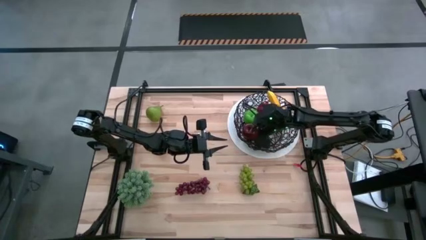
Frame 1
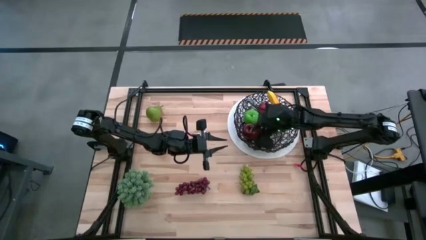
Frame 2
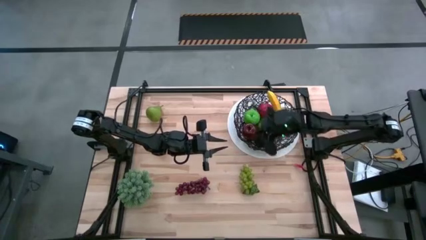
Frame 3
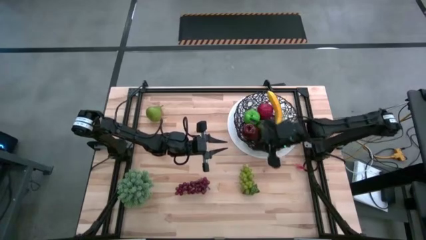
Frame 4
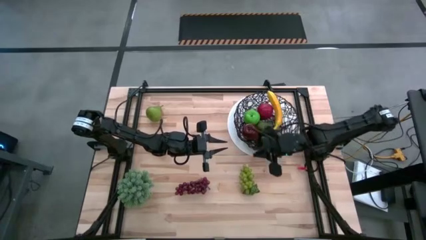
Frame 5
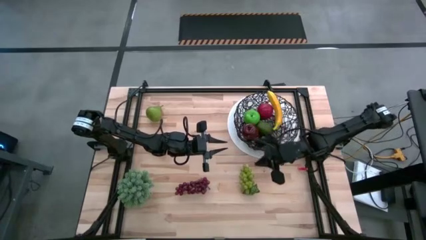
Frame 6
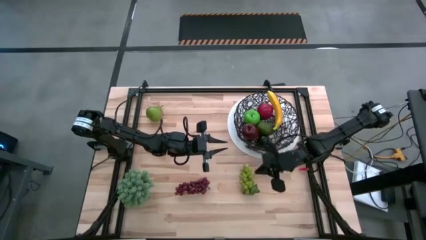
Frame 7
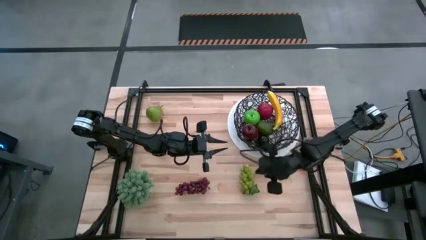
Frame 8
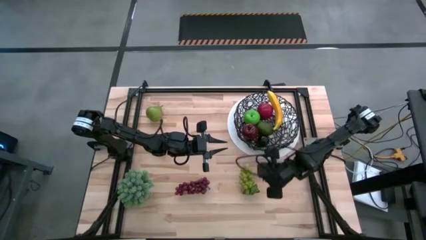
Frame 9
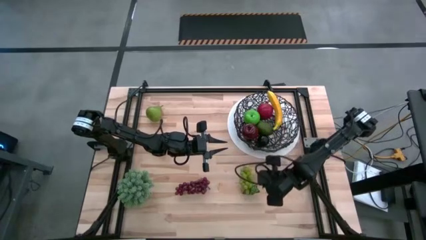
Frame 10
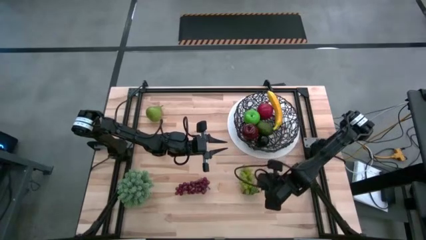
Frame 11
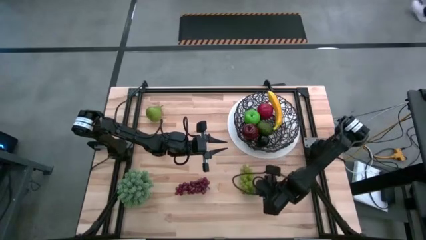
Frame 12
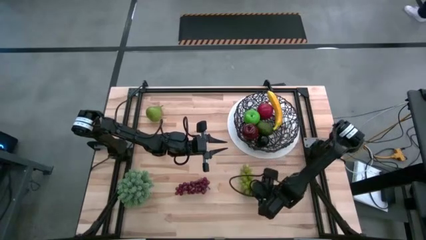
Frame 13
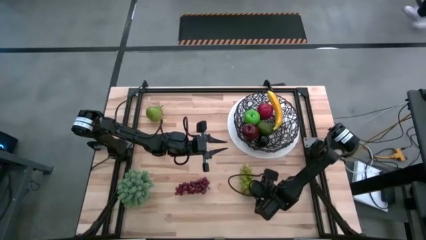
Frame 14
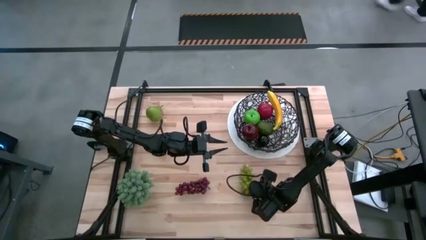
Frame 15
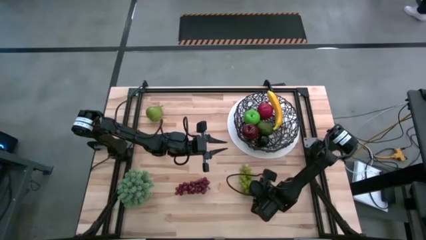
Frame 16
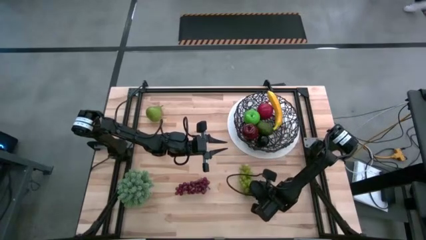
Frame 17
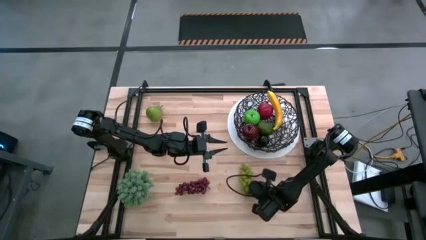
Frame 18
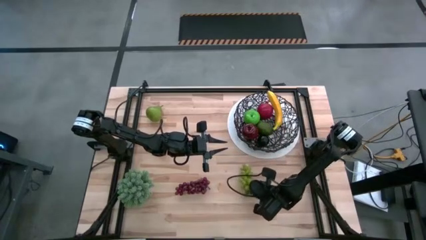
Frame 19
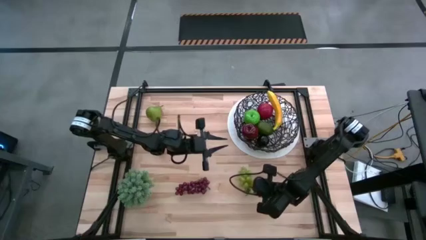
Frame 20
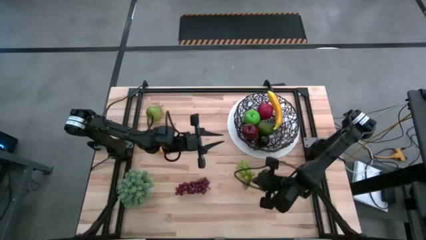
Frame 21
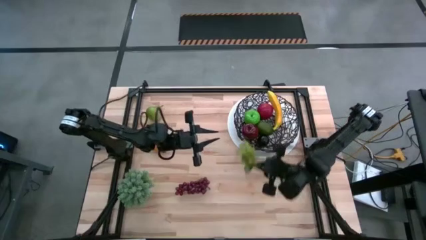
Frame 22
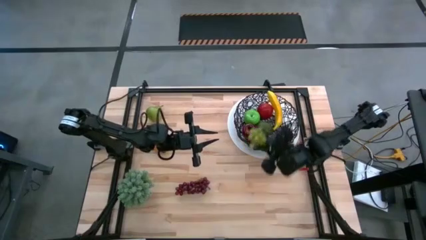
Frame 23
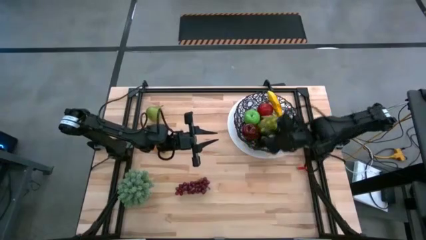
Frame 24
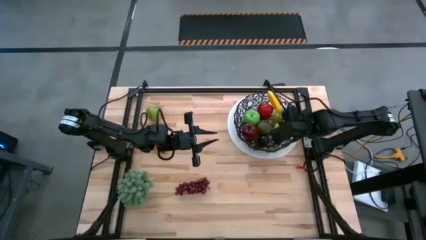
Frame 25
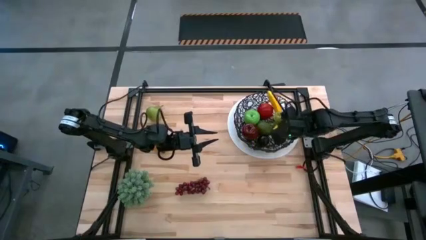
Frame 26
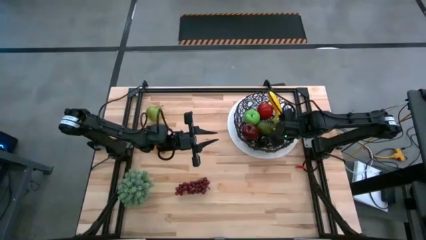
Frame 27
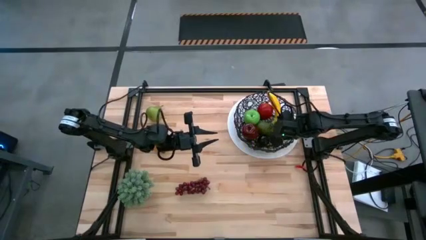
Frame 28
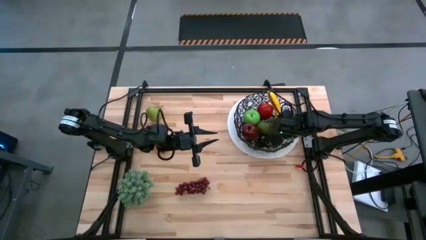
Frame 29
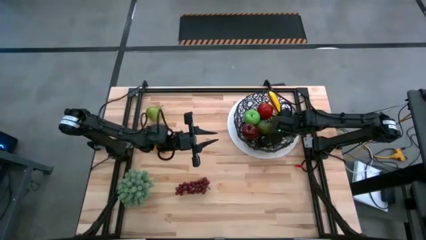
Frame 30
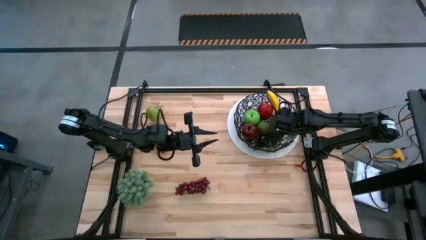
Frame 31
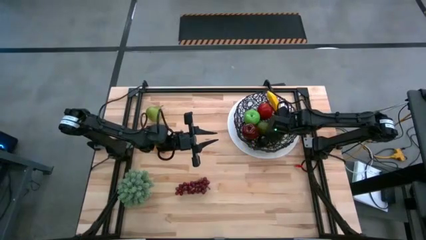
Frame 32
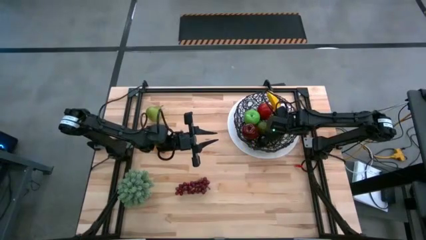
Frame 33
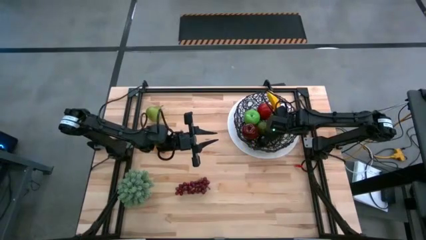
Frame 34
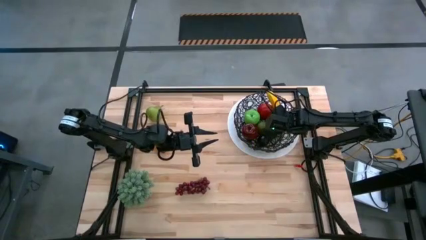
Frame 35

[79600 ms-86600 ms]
Task: Build produce basket
Put the green grapes into the wire basket

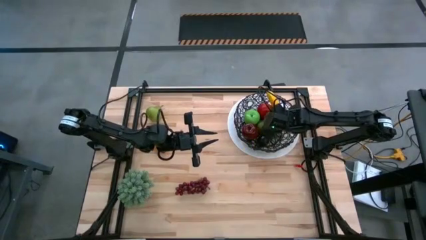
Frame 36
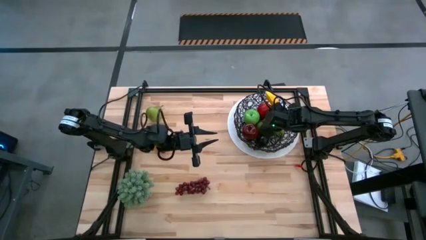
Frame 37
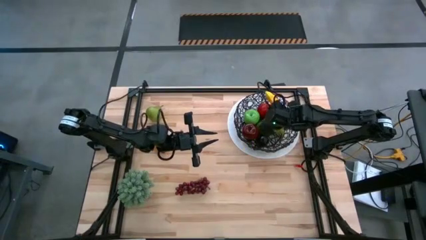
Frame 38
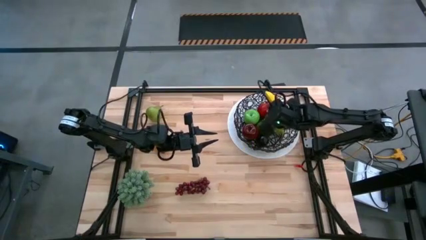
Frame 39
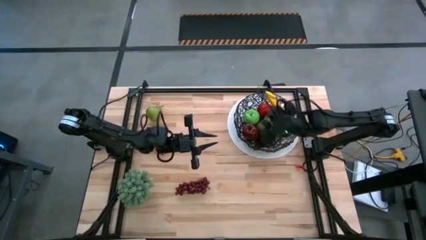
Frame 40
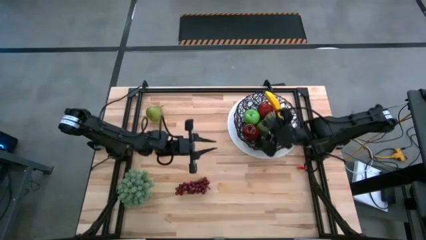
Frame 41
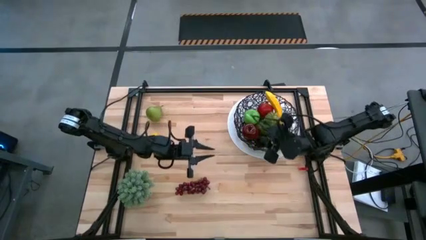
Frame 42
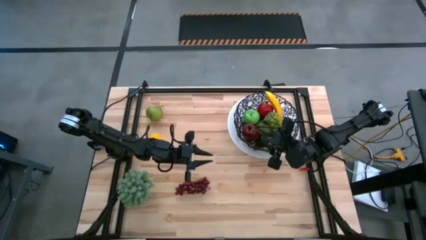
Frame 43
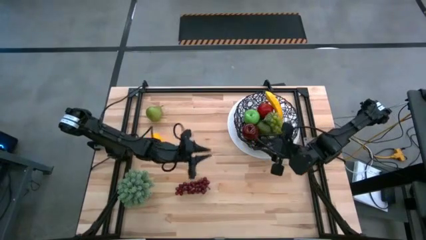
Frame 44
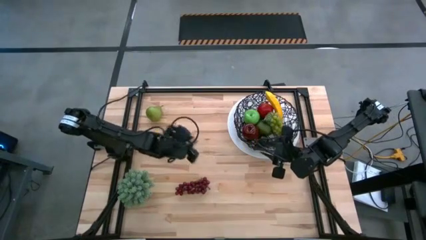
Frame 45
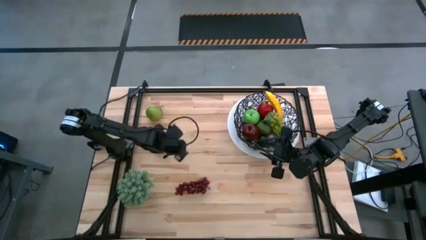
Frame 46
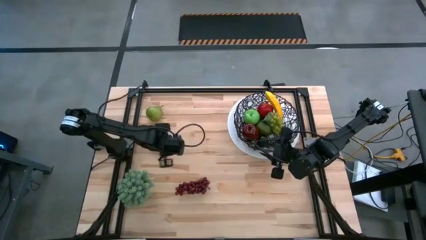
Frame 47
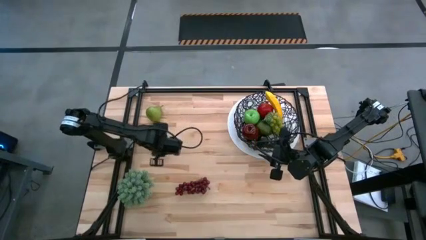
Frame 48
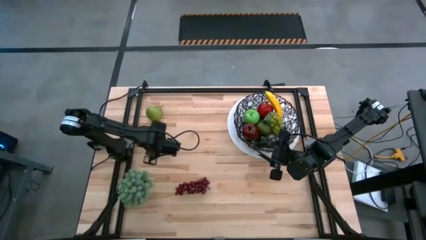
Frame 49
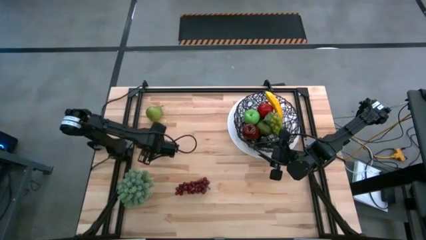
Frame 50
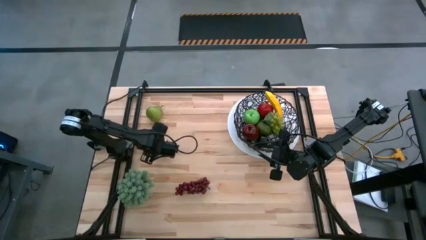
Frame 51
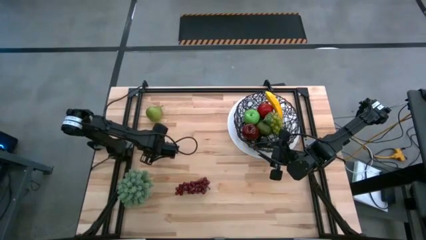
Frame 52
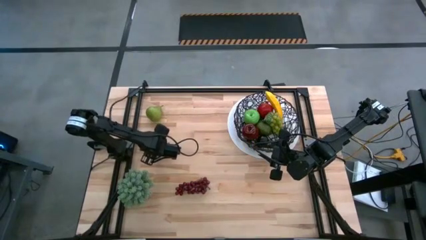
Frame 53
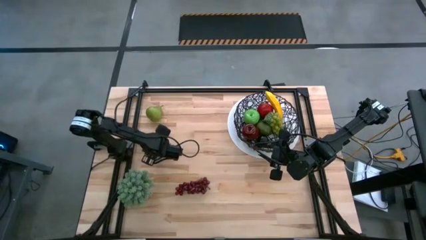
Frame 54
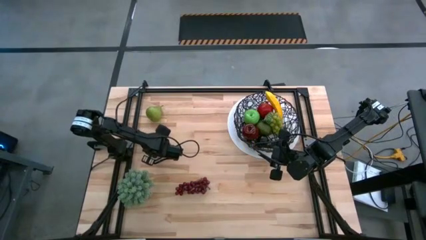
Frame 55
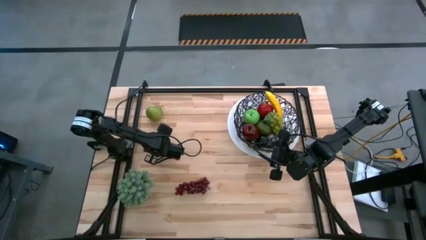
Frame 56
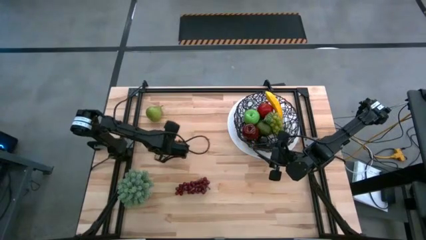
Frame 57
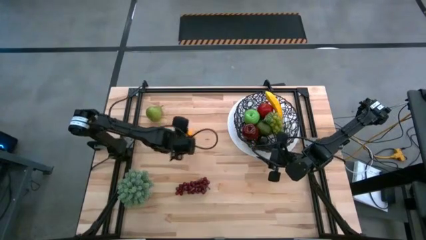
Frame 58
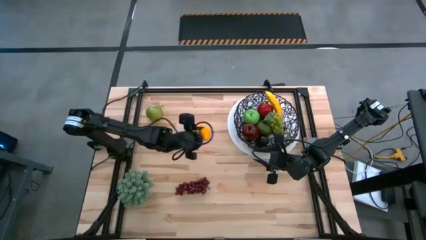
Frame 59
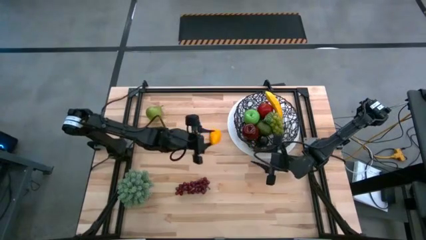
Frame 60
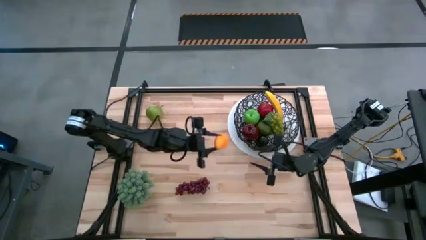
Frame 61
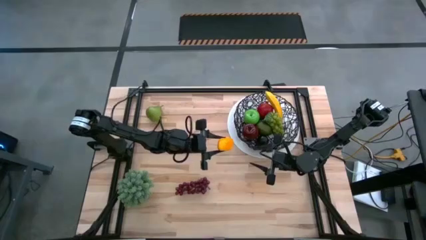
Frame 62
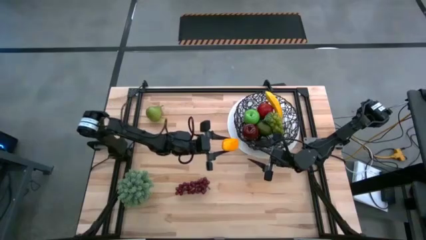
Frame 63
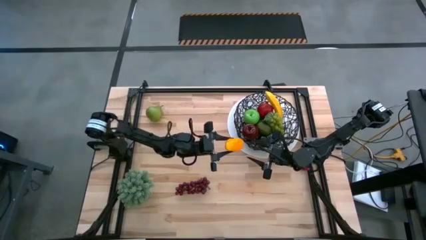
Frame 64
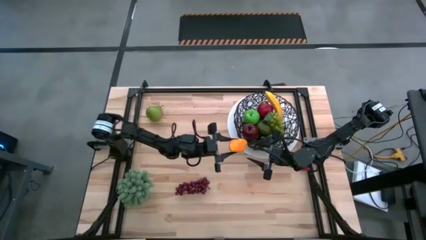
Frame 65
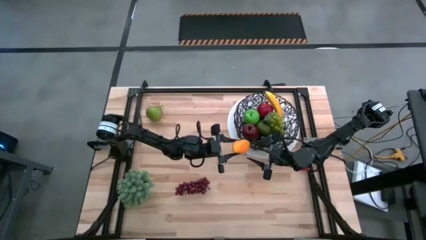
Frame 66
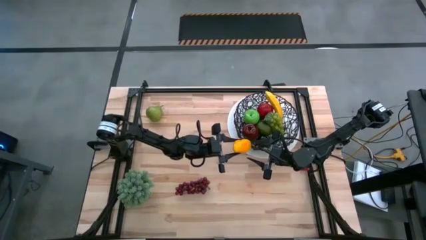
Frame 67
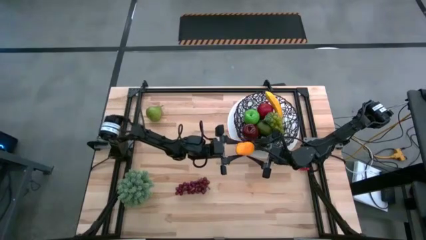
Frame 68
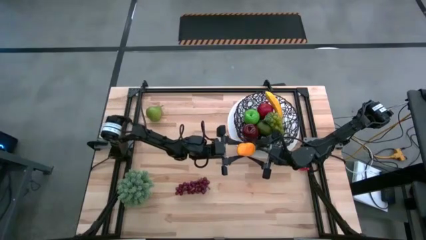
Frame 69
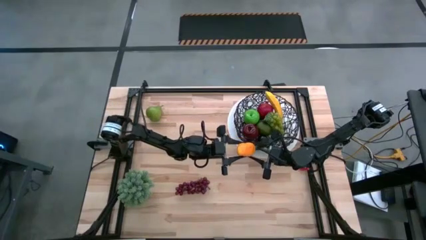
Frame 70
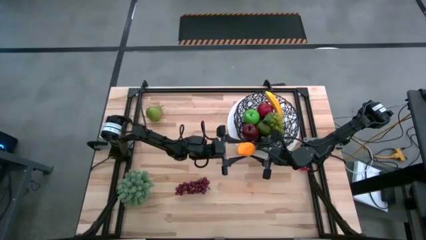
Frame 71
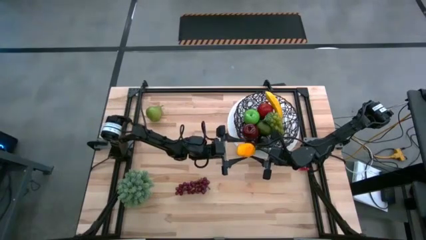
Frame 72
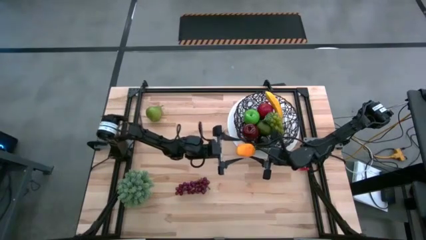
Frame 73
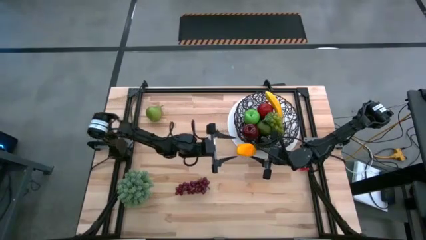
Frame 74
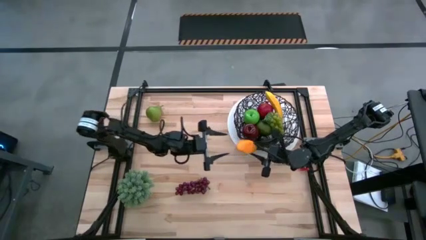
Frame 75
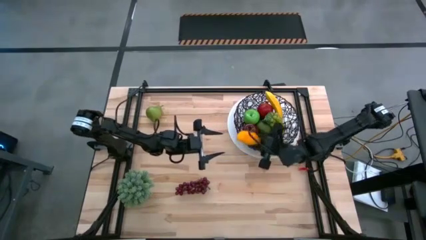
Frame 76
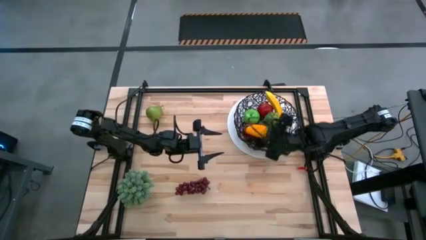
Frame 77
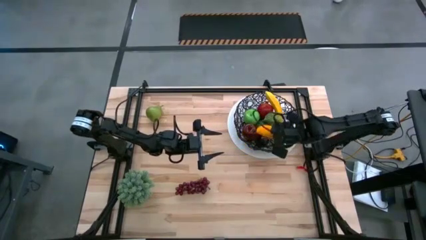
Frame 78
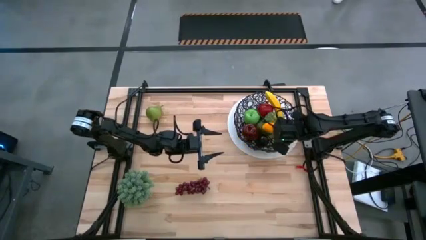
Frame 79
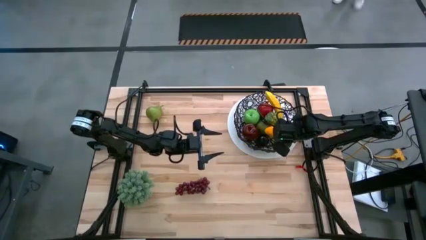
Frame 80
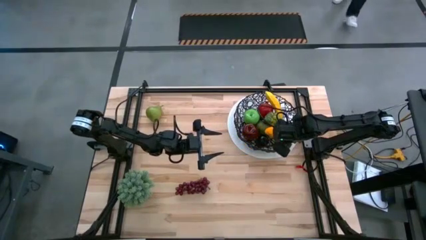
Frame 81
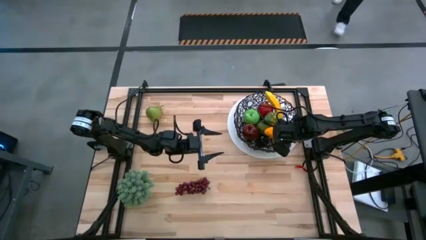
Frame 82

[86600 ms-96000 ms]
Put the yellow mango into the wire basket

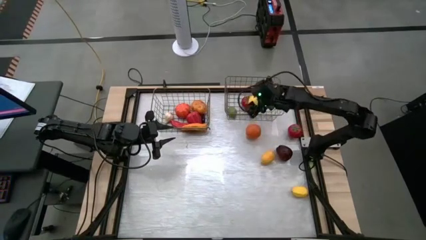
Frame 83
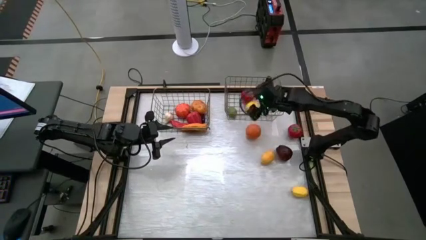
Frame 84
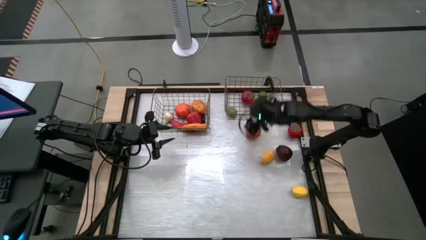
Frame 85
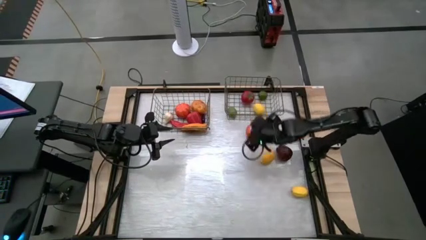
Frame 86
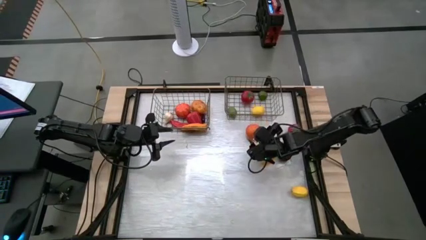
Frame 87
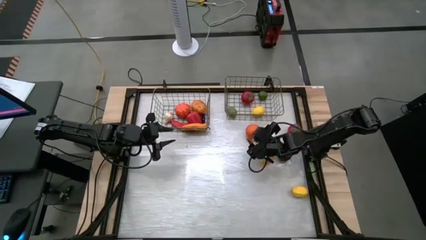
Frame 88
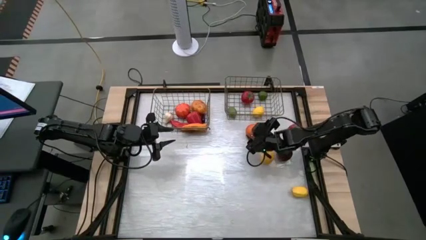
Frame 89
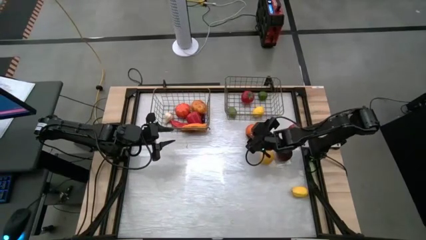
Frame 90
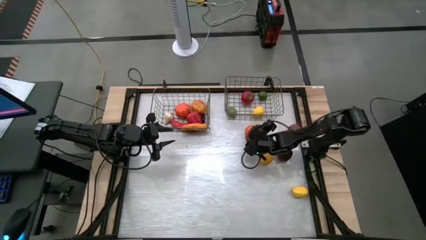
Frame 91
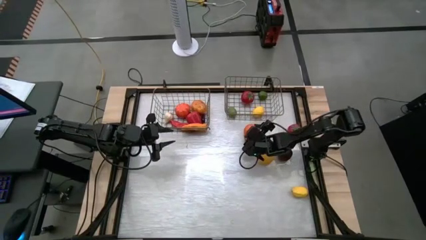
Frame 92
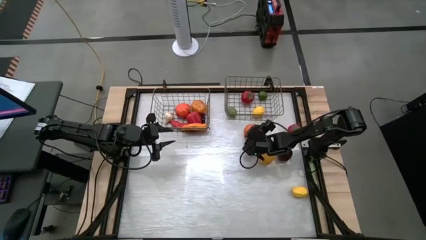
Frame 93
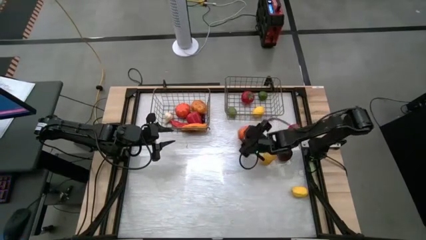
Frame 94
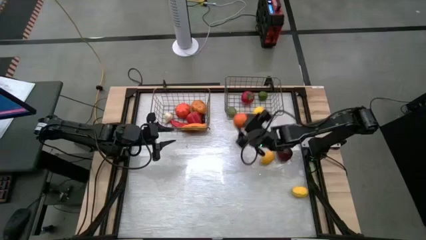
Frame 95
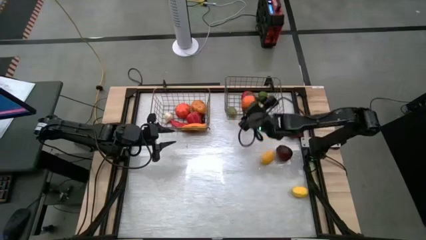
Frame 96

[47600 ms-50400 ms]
Task: Sort produce into baskets
Put the orange into the right gold wire basket
